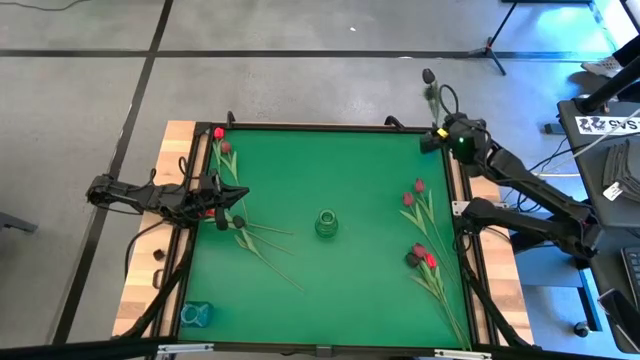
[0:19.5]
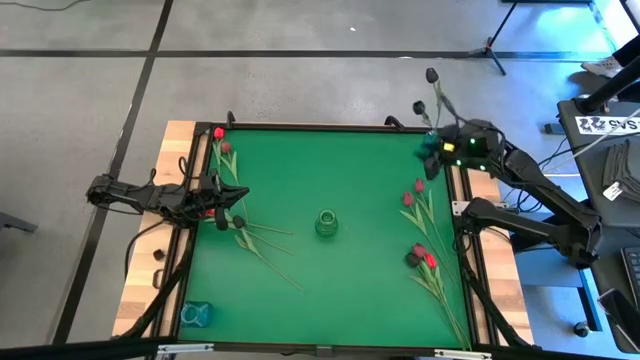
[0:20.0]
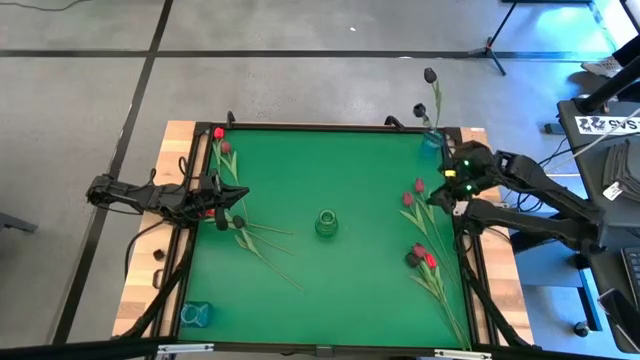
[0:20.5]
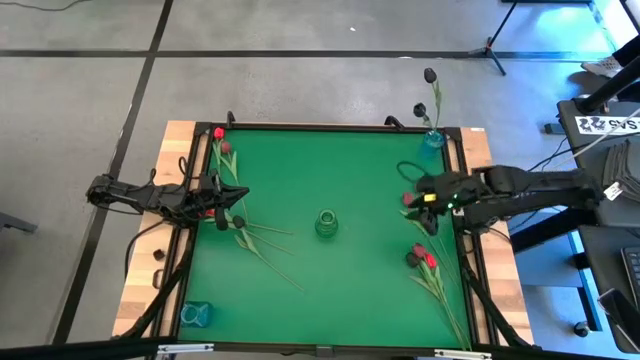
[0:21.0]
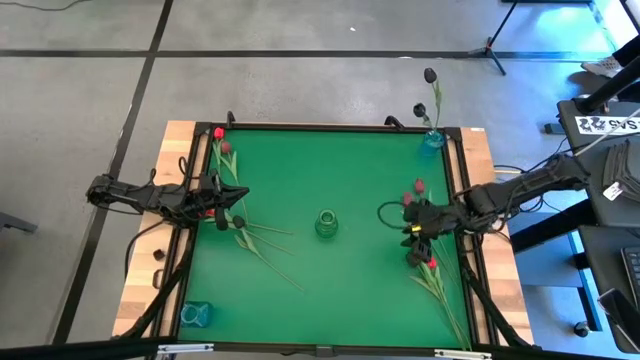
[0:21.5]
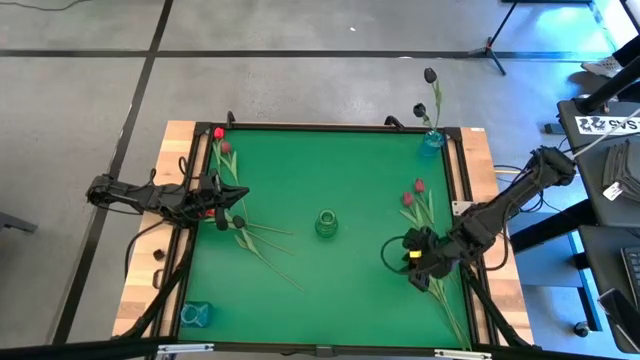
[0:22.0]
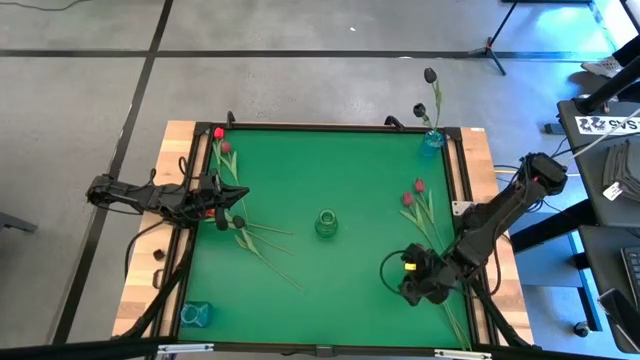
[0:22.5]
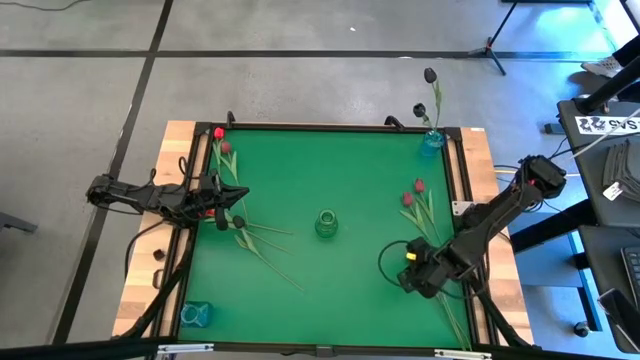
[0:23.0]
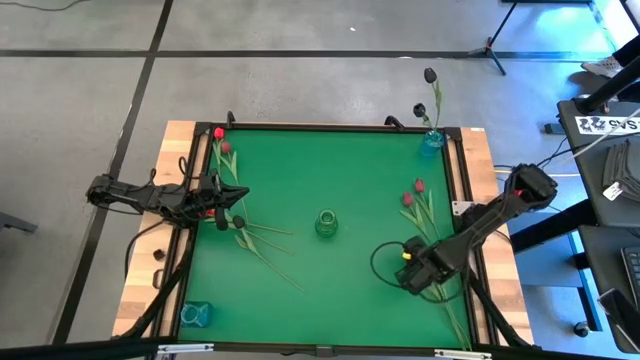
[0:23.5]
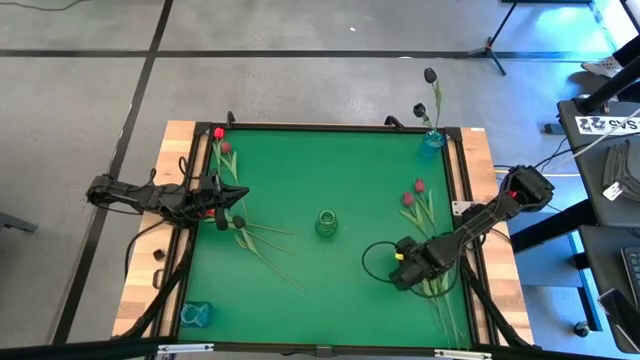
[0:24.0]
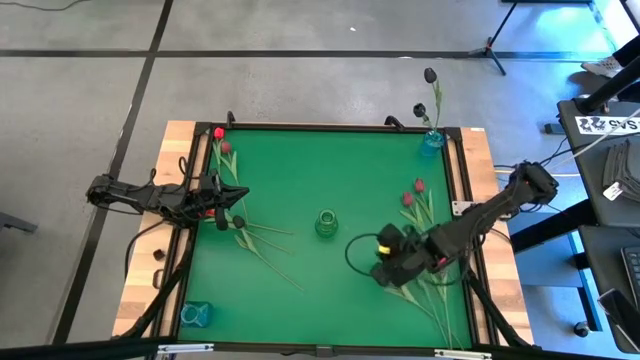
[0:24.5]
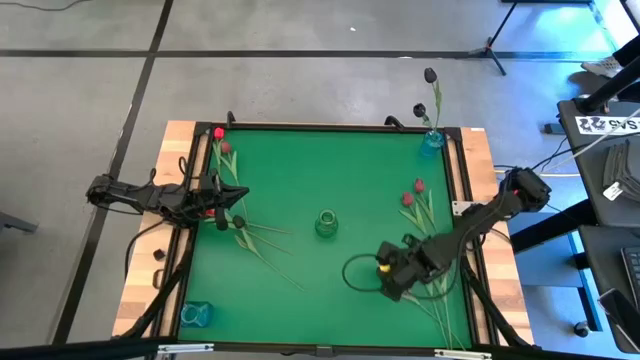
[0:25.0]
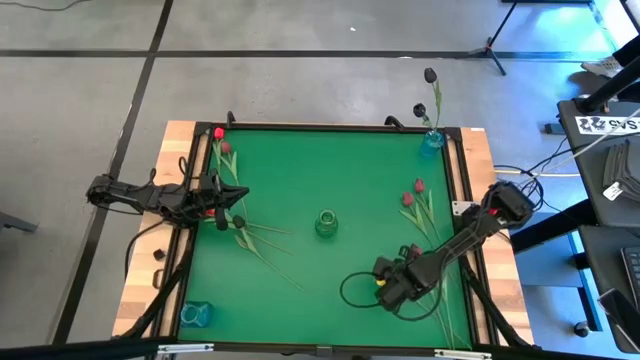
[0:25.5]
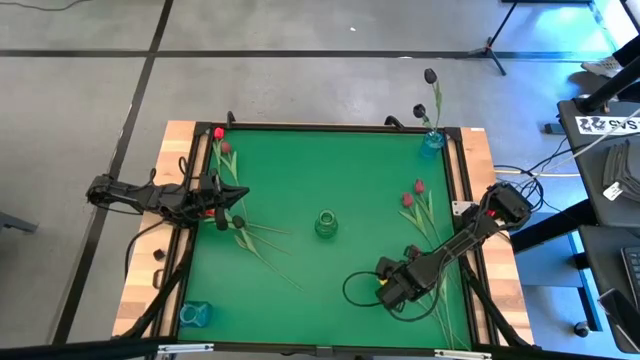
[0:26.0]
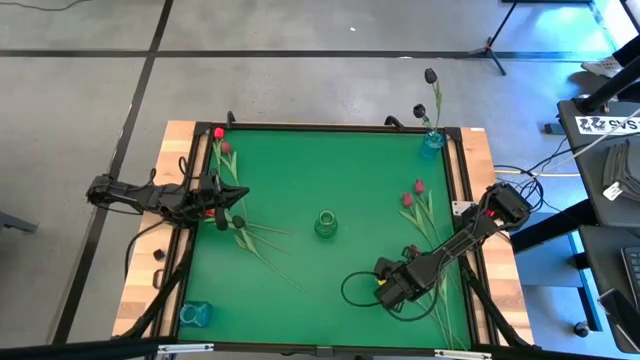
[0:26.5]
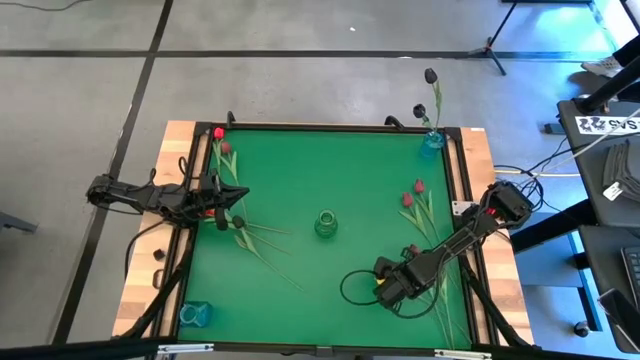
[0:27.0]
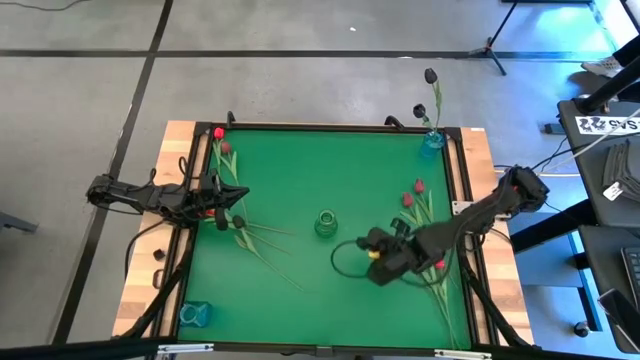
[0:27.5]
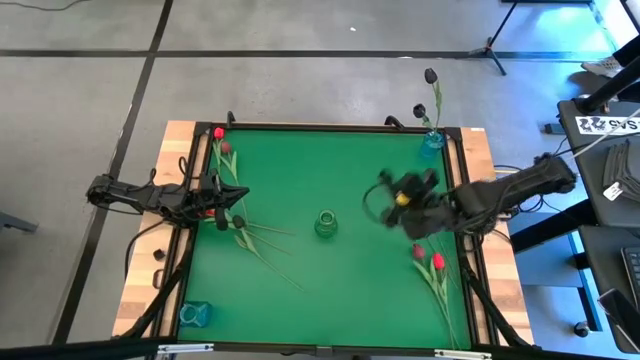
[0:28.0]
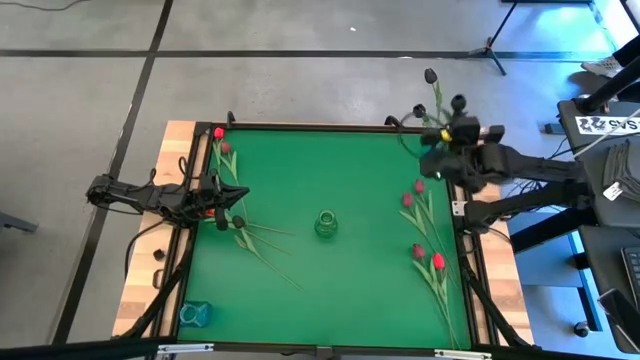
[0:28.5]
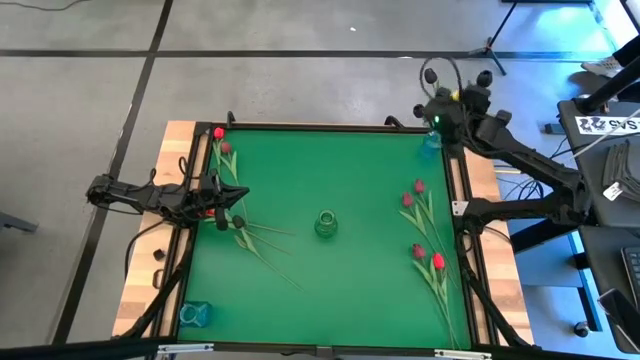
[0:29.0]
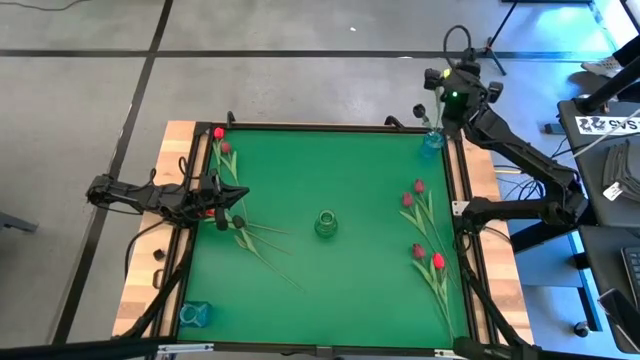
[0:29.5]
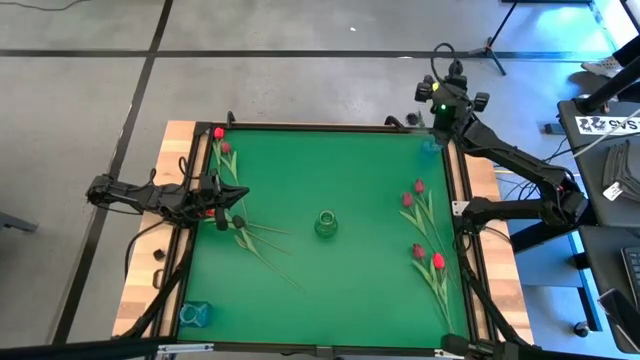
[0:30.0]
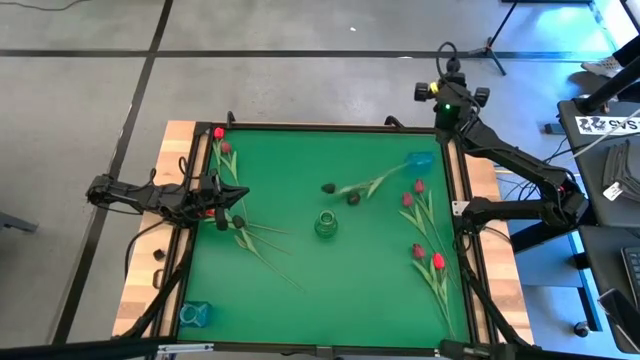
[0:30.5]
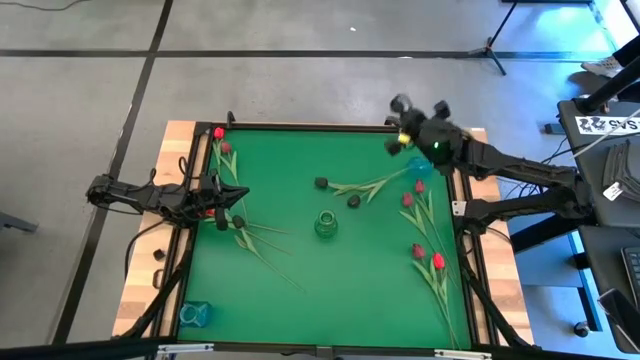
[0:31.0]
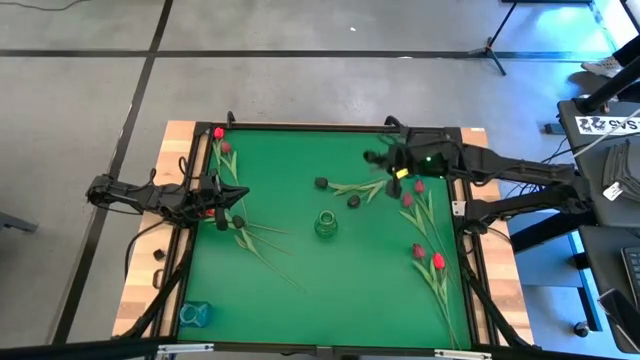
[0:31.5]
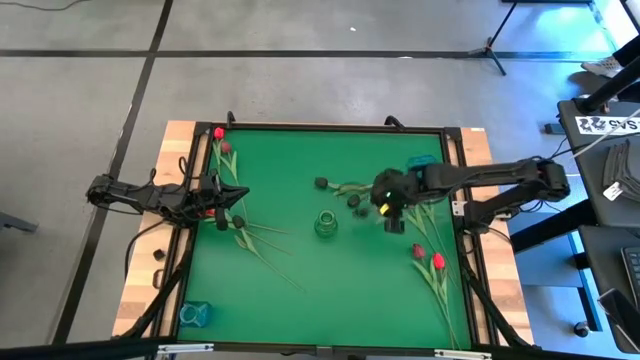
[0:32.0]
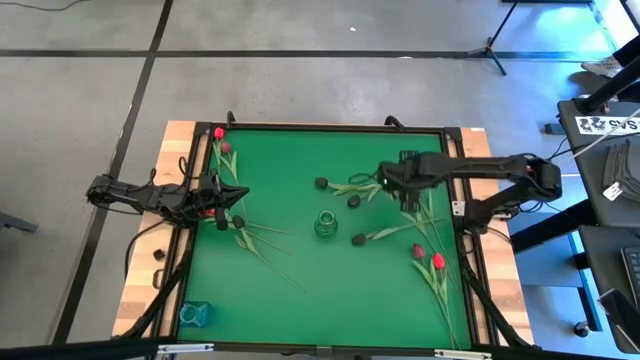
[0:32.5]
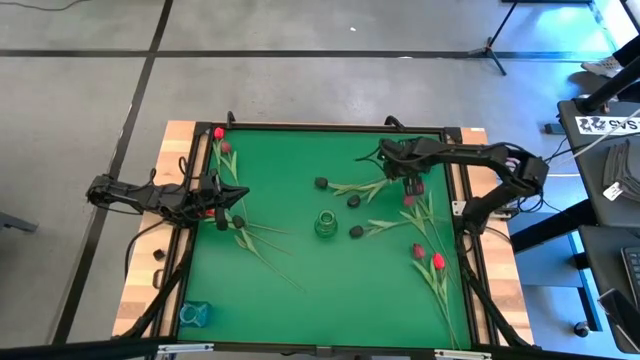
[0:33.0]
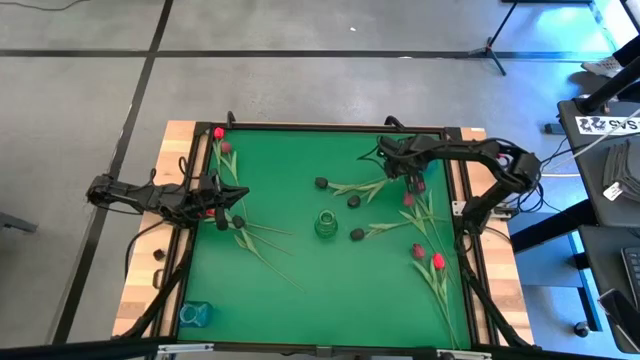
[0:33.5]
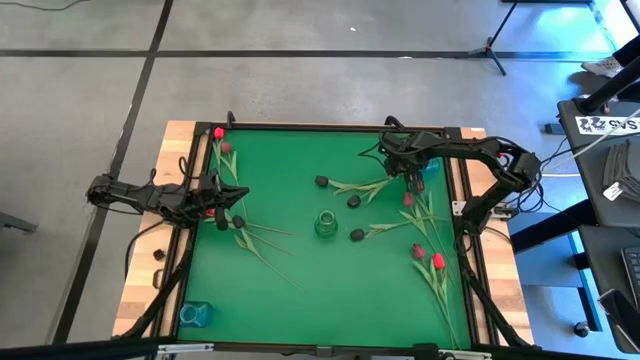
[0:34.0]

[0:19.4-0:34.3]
Task: Sort flowers into vase by color
Put the right black flower into the top right blue vase

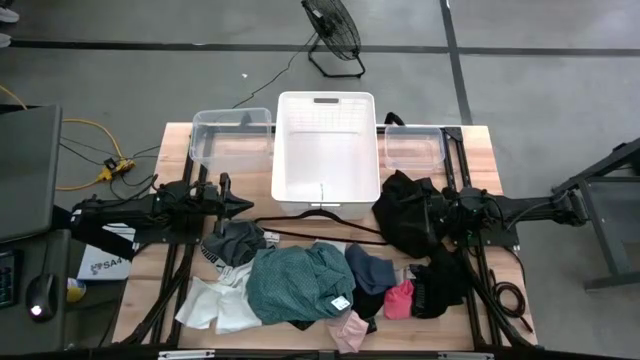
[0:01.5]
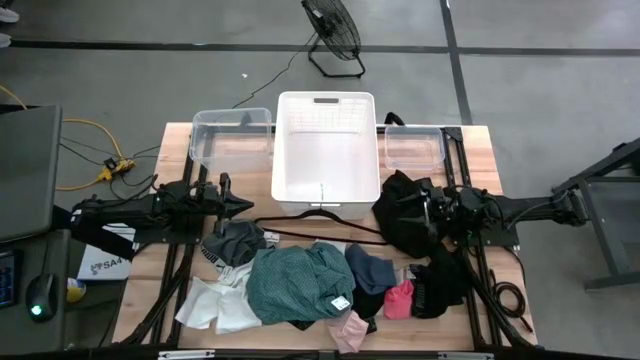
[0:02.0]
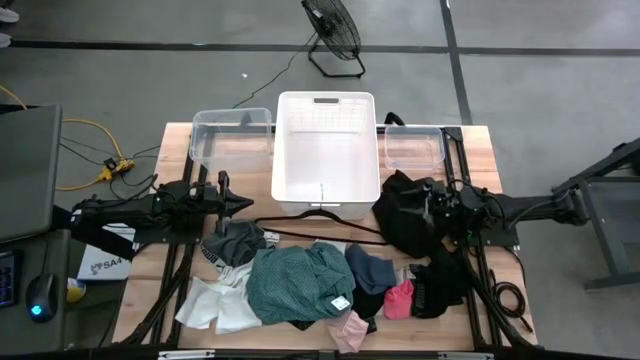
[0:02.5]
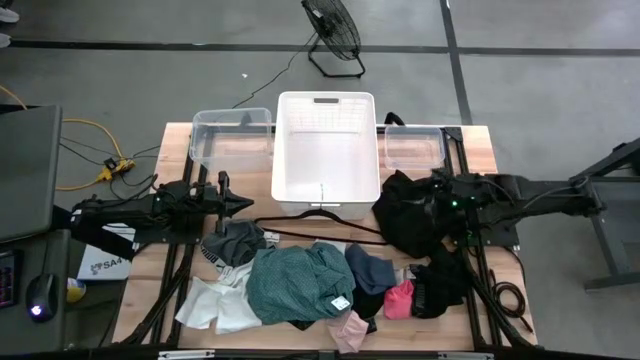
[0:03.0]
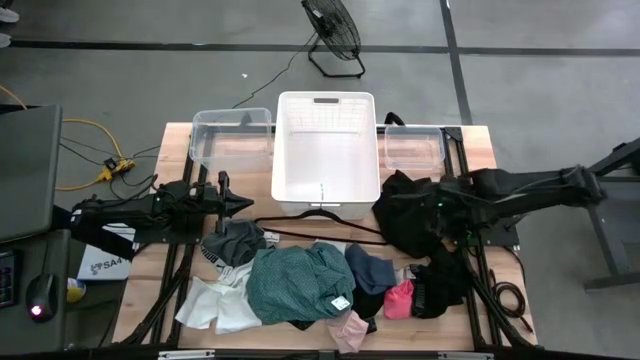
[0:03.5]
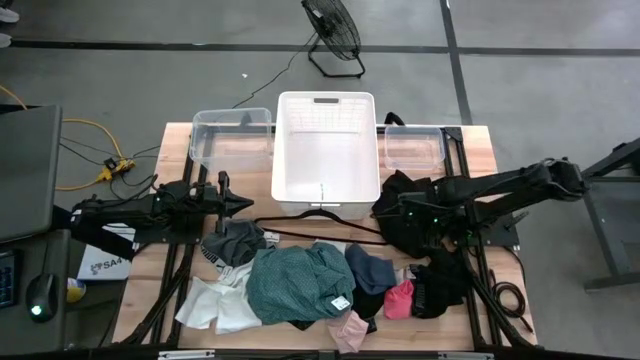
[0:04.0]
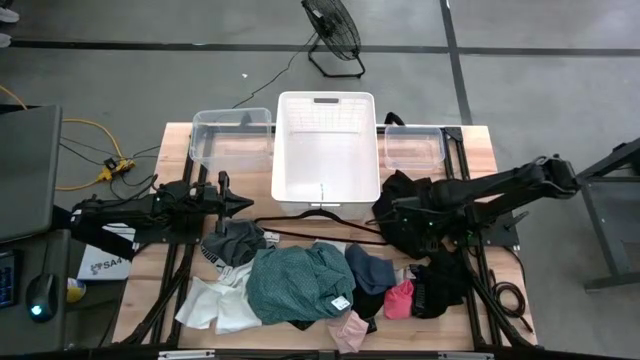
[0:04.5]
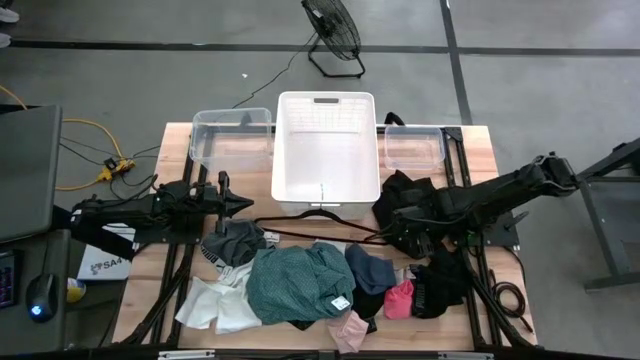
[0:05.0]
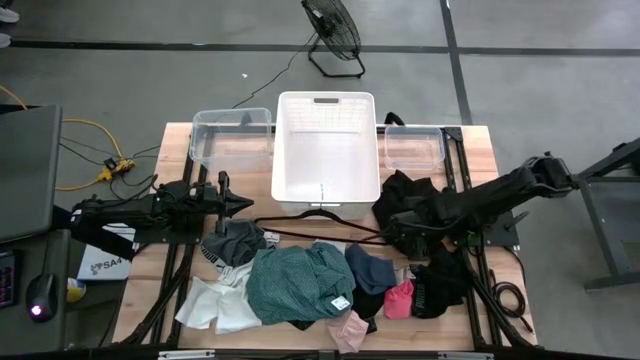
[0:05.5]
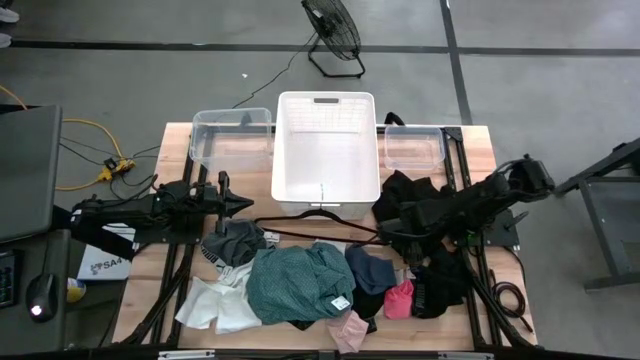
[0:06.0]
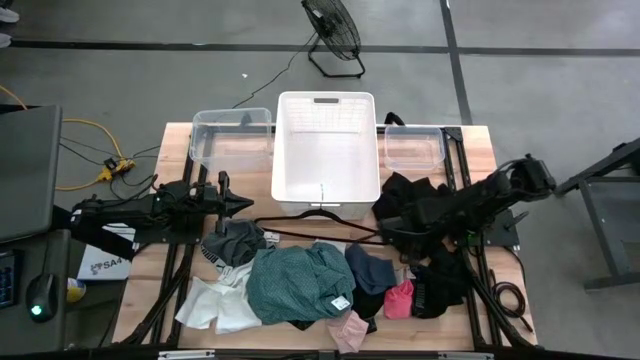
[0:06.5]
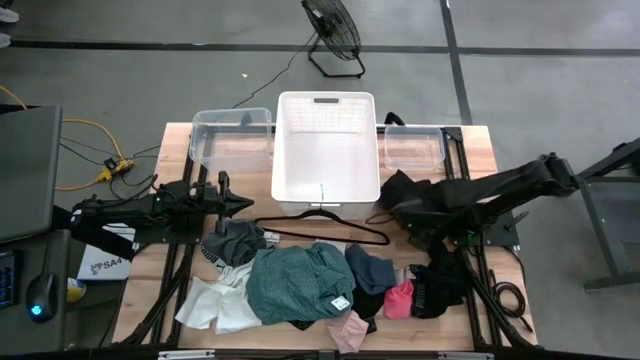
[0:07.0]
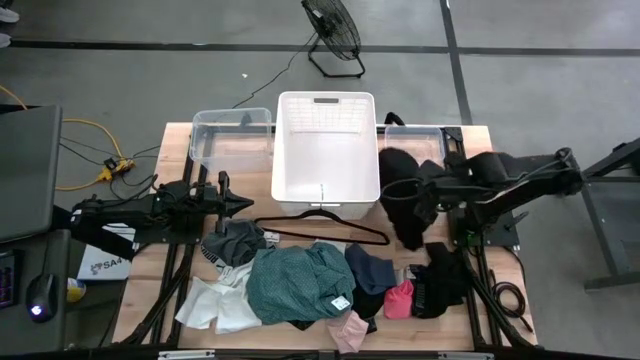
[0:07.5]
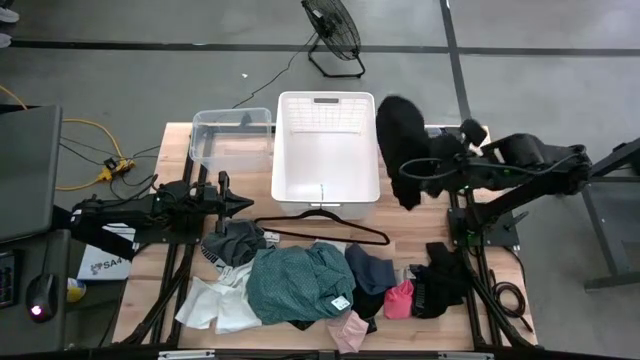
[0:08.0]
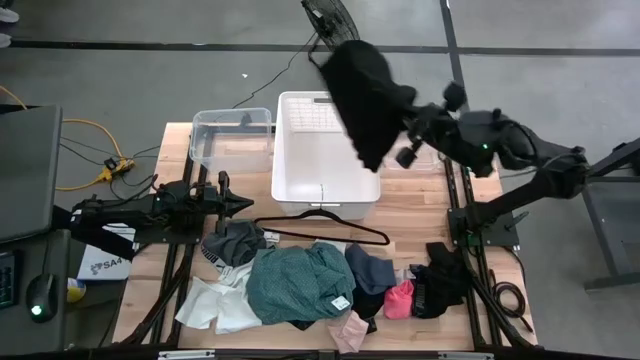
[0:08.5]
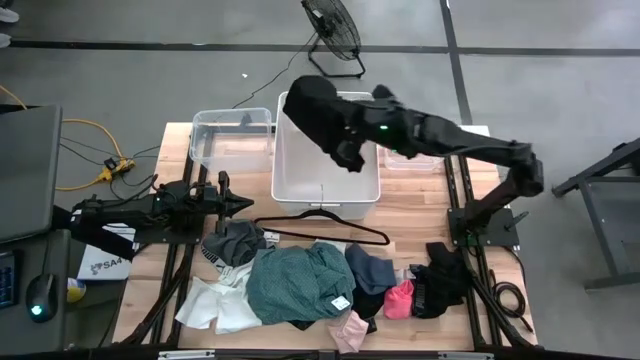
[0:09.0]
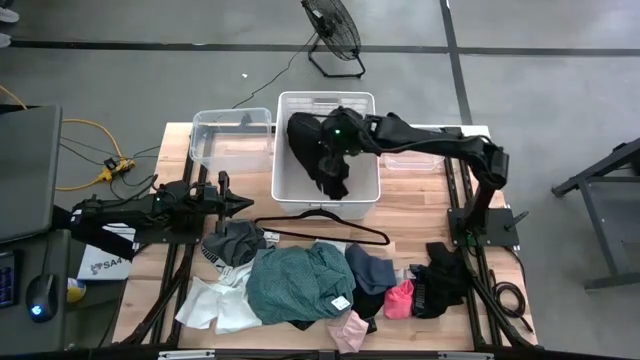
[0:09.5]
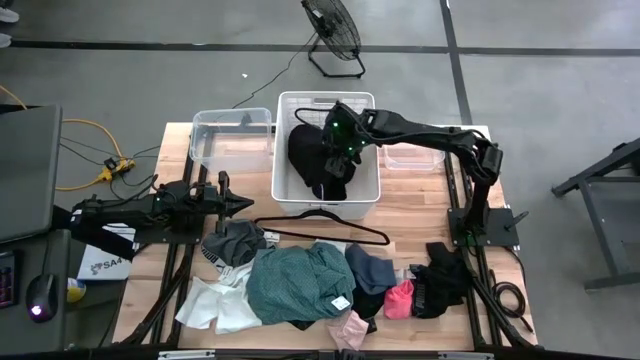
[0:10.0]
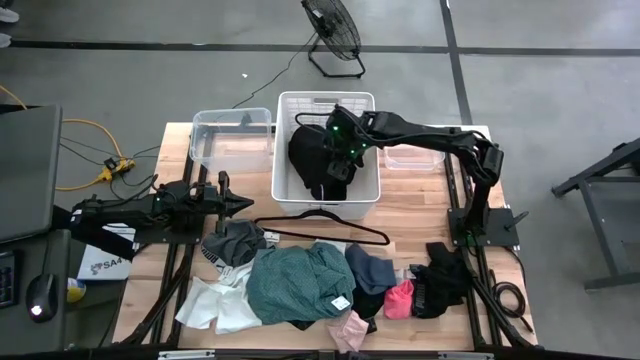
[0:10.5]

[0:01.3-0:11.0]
Task: Pick & Place Cloths
Put the black shirt into the white laundry basket
